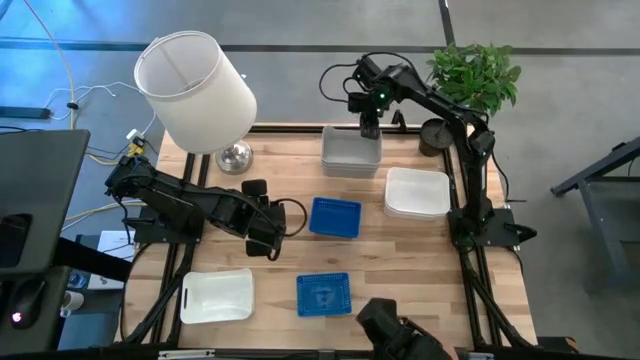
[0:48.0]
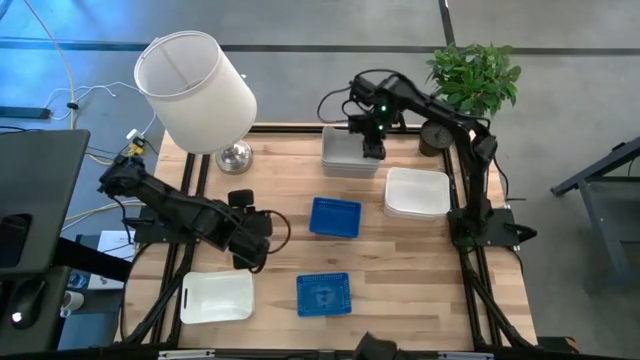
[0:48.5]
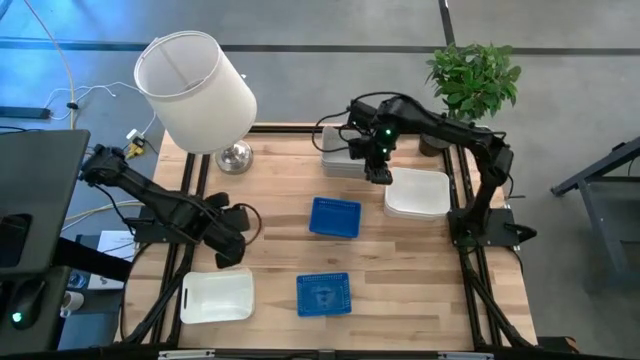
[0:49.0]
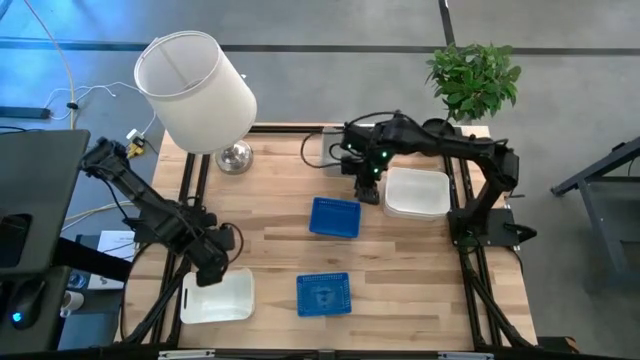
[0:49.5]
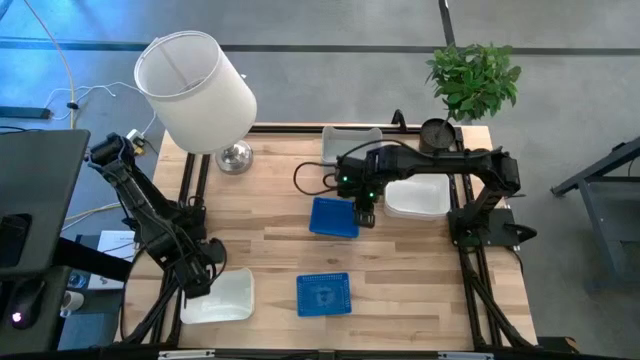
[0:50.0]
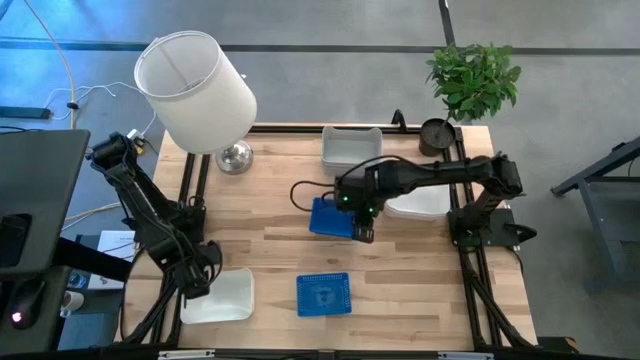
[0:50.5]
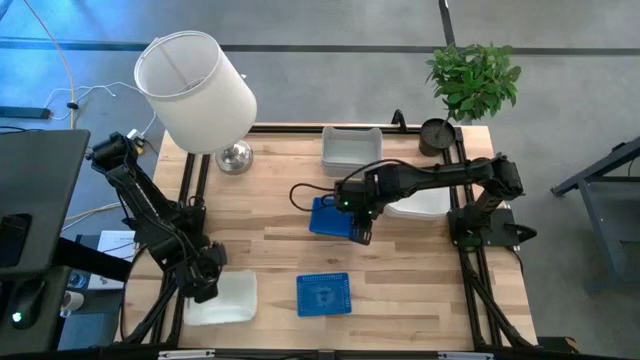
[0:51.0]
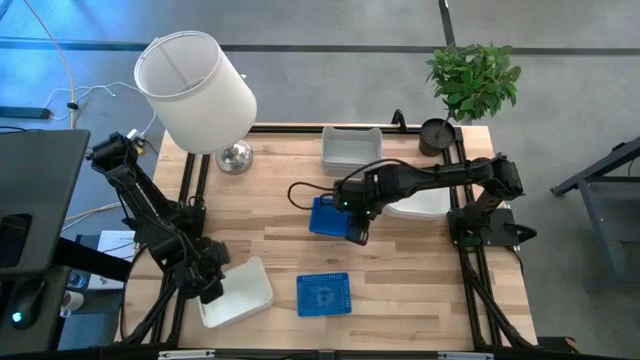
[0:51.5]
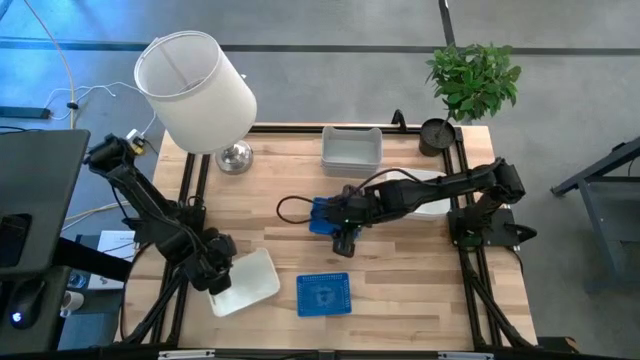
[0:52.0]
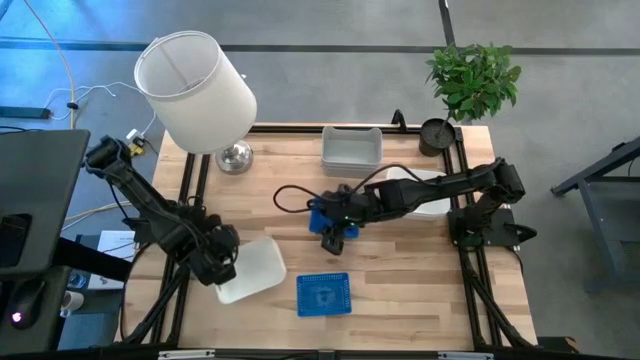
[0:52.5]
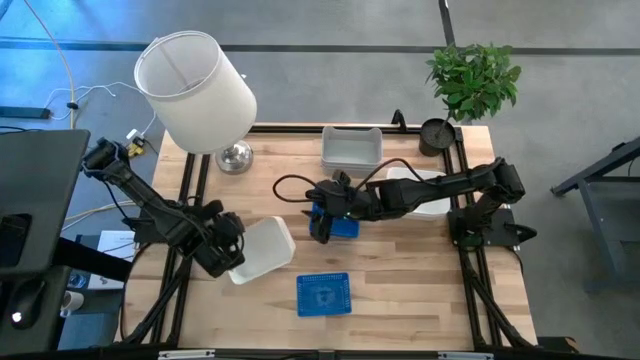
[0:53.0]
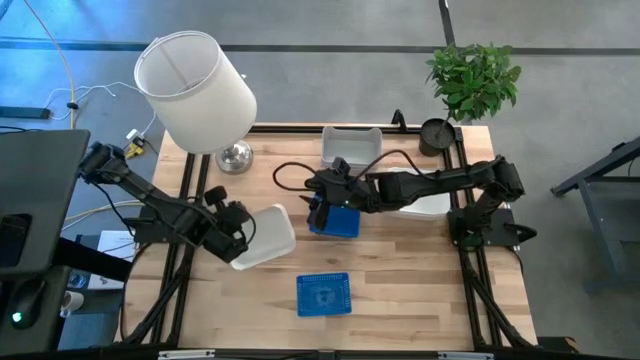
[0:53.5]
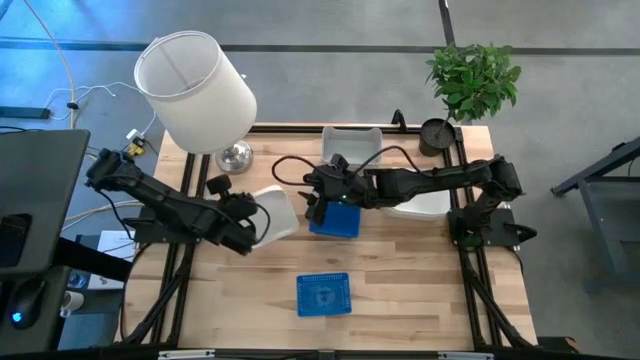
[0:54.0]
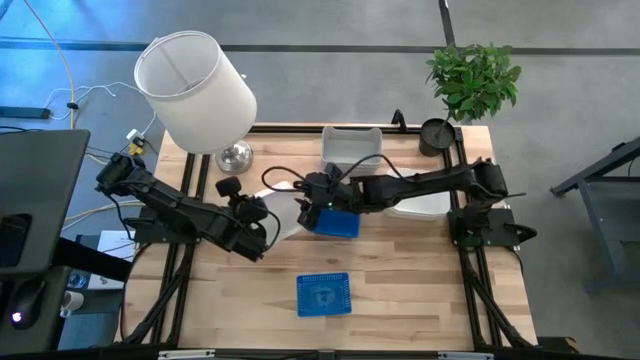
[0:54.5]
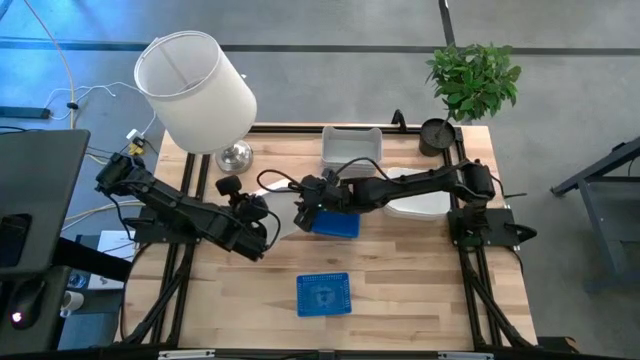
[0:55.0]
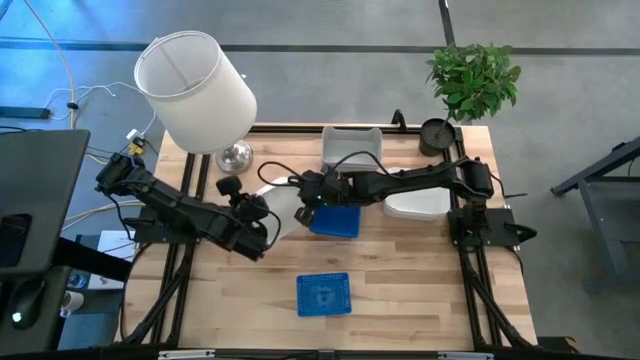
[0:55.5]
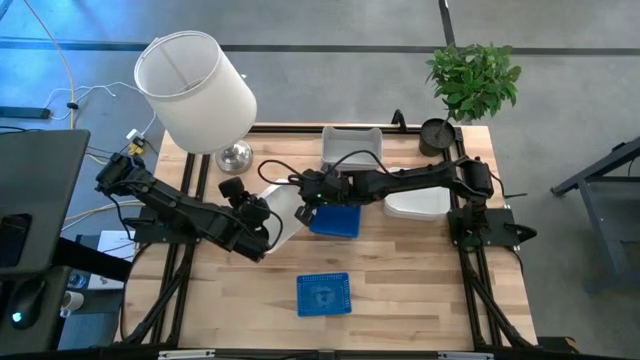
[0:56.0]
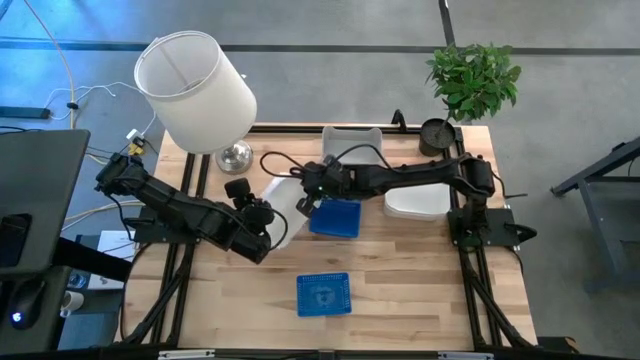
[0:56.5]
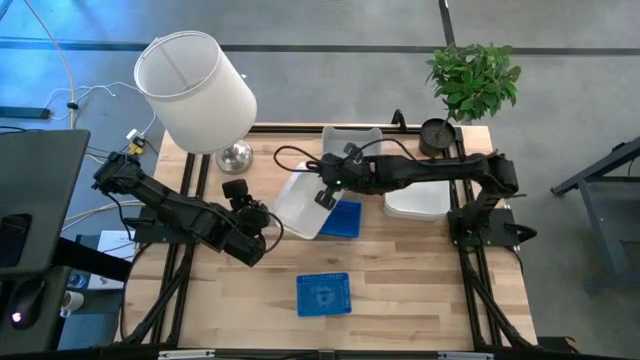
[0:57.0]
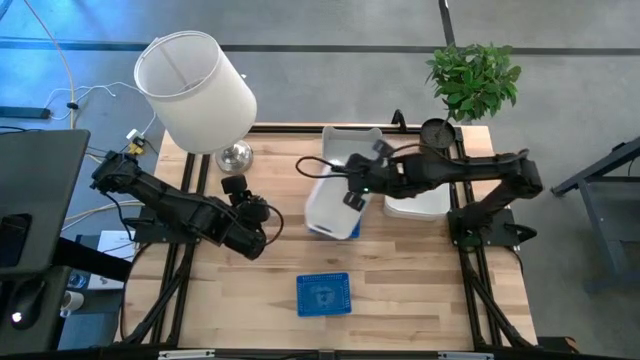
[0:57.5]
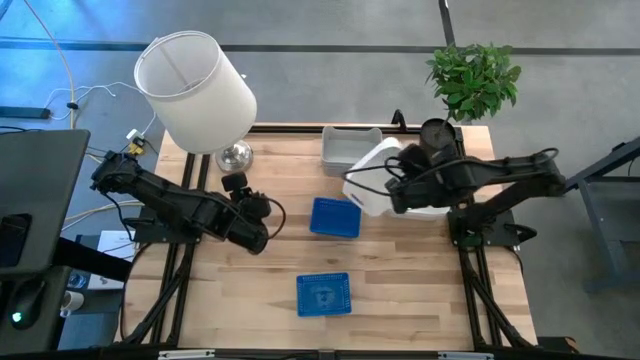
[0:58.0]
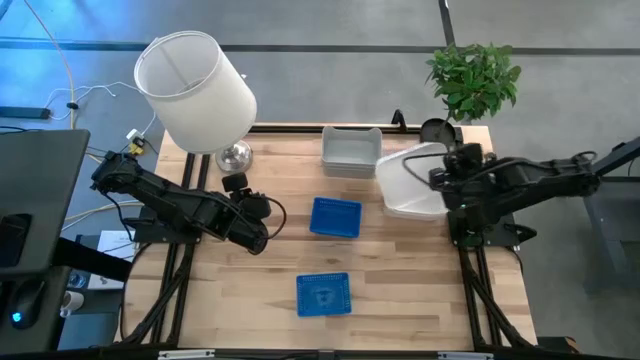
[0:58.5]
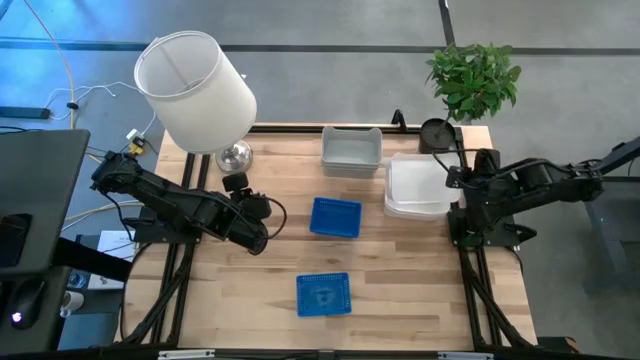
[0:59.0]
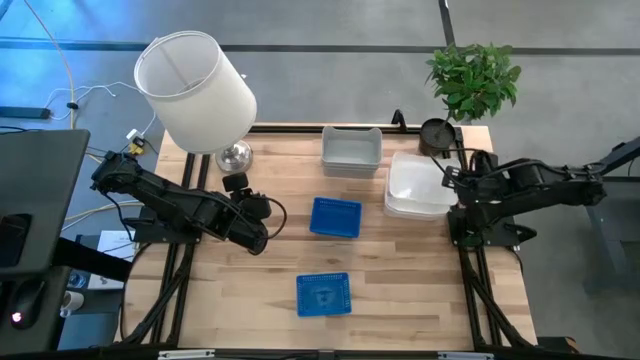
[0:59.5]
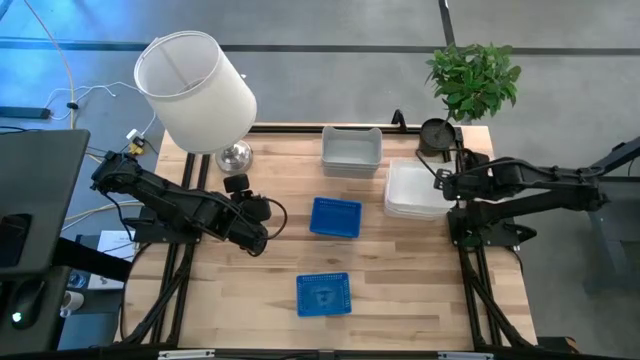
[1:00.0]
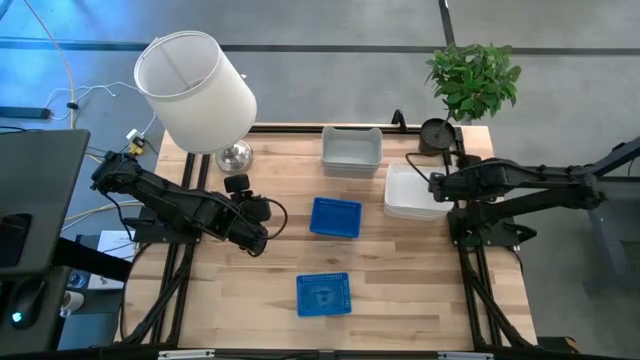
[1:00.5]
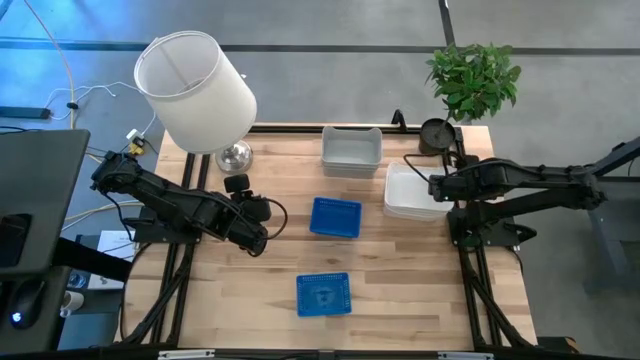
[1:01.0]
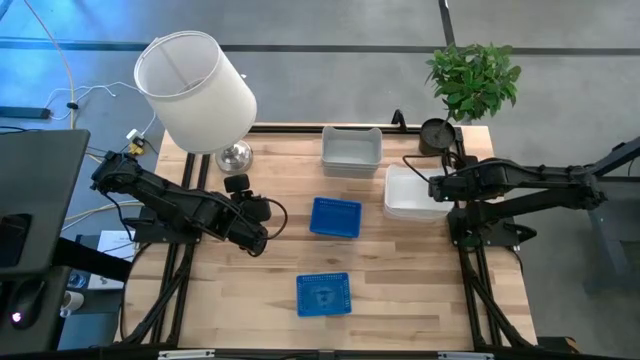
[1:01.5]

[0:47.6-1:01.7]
Stack the bottom white bin on top of the top white bins

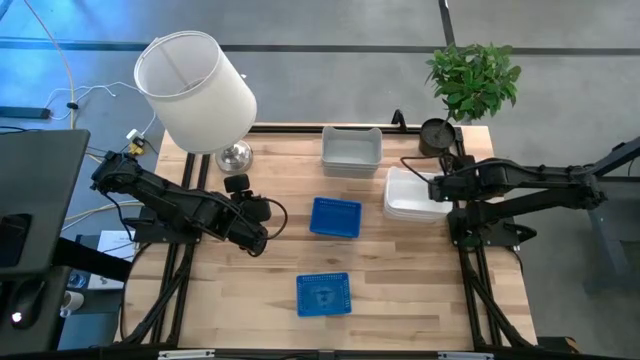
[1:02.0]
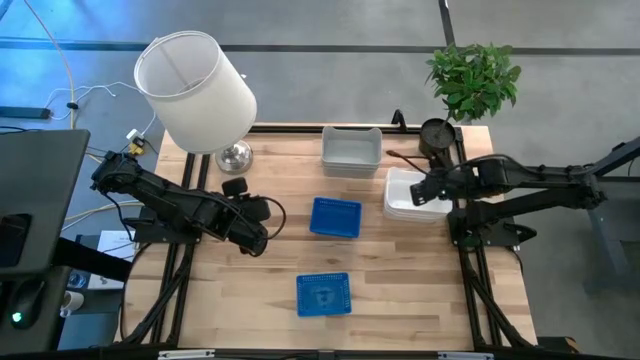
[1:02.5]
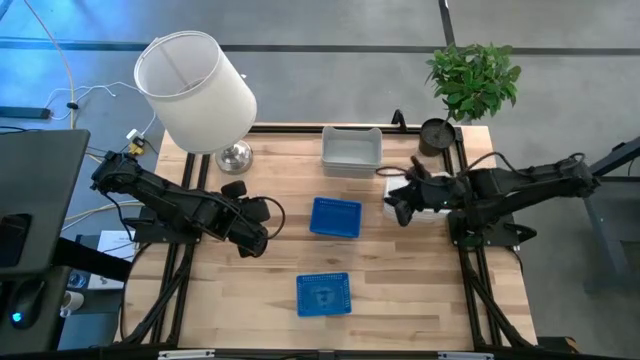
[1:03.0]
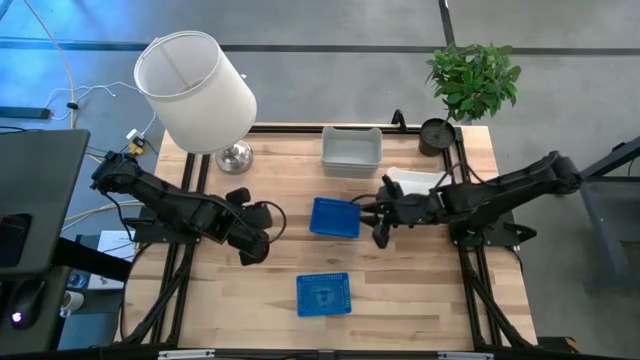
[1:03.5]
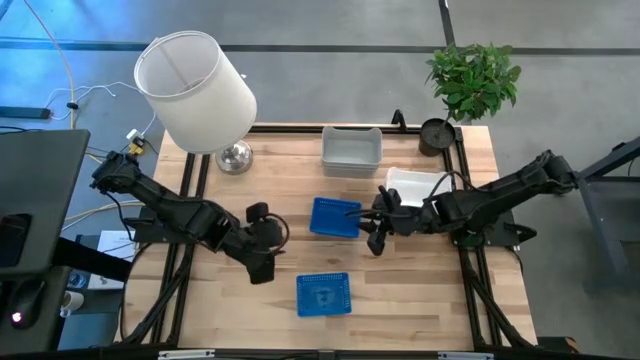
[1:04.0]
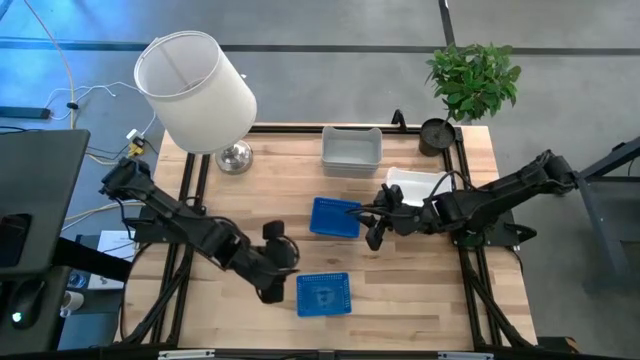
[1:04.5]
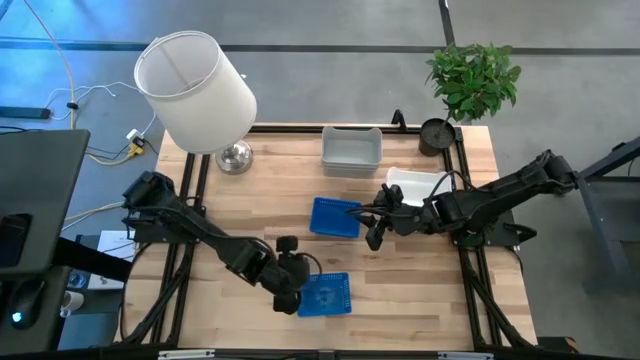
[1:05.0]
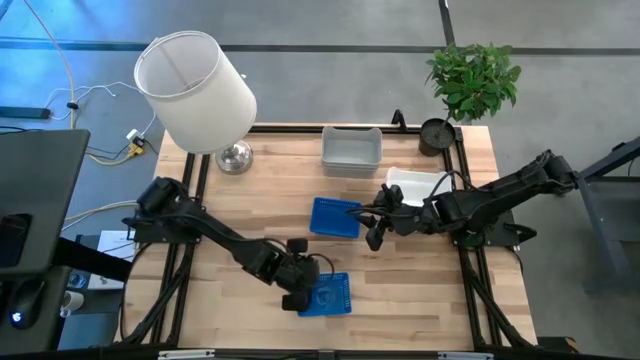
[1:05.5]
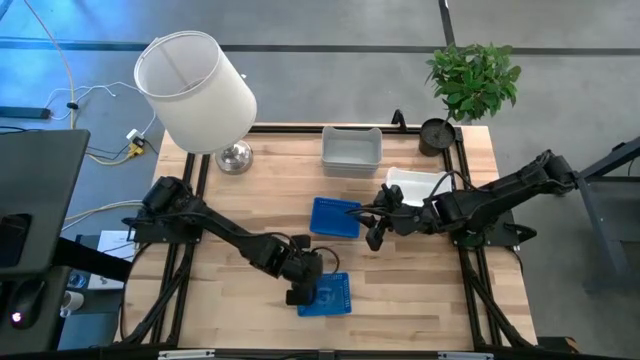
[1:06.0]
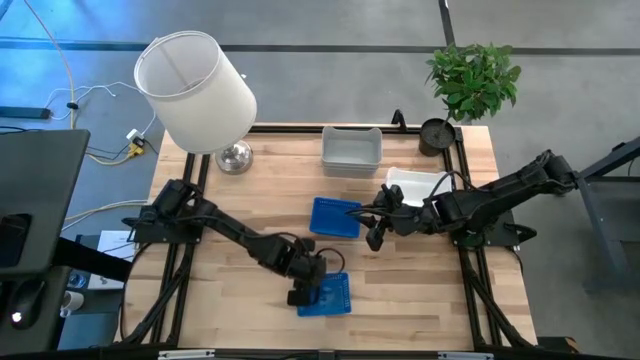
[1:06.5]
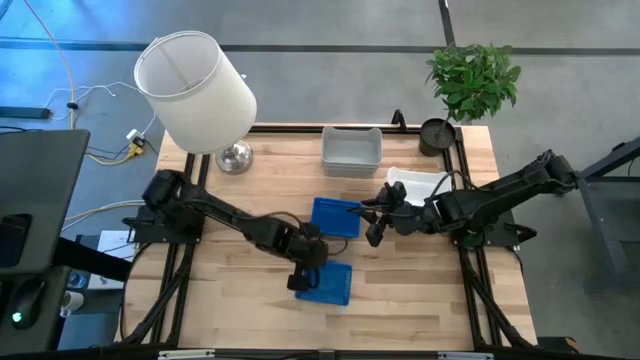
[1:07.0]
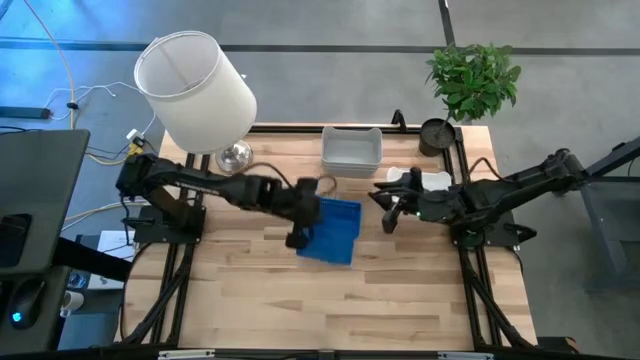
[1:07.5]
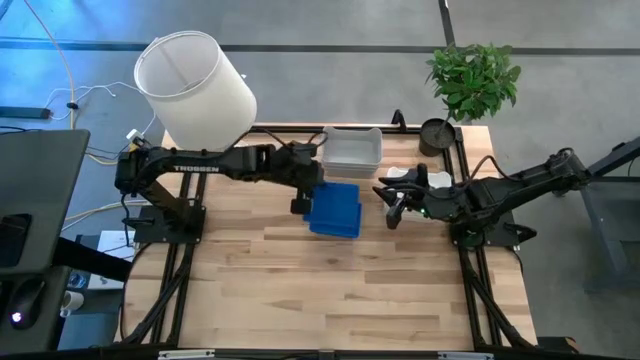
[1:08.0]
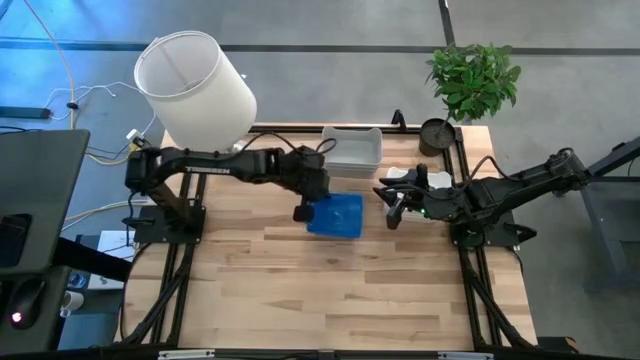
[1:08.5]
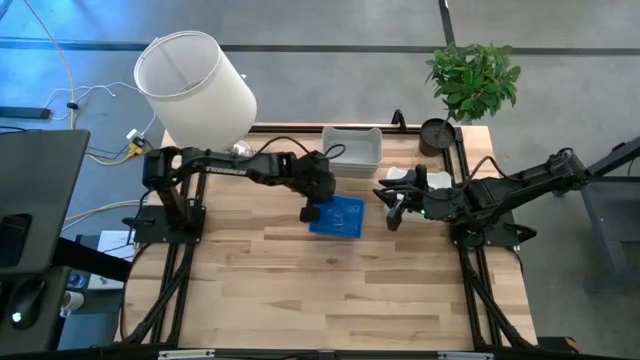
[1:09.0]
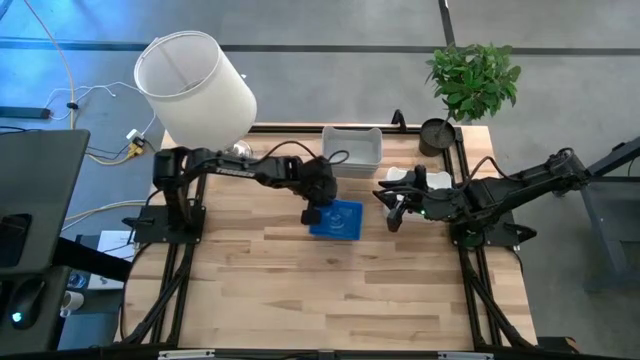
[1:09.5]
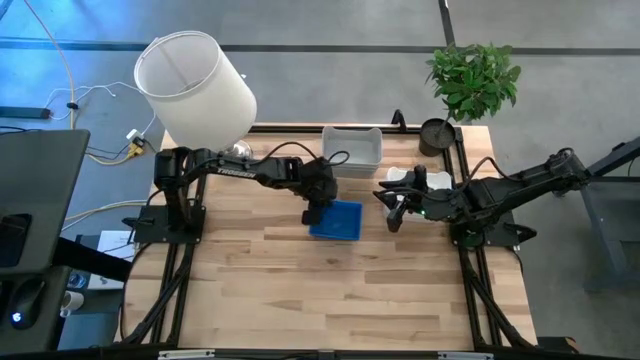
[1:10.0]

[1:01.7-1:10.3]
Stack the bottom blue bin on top of the top blue bins
